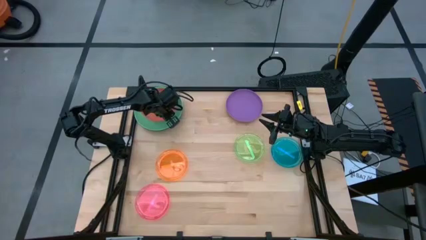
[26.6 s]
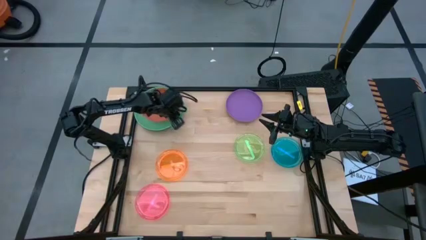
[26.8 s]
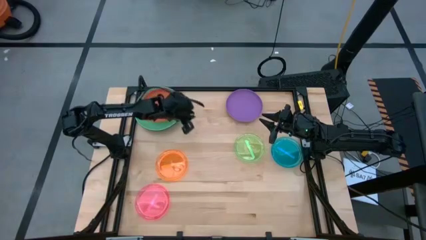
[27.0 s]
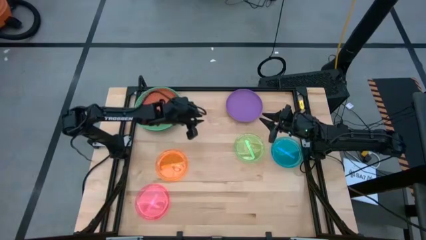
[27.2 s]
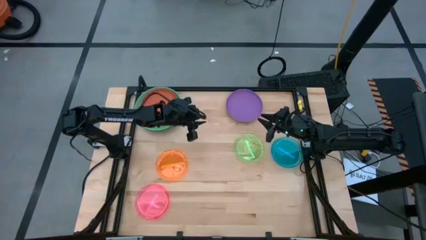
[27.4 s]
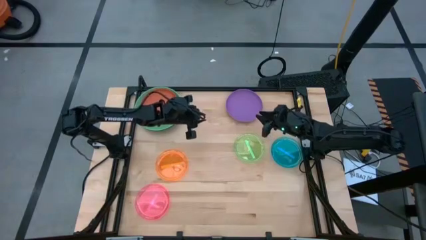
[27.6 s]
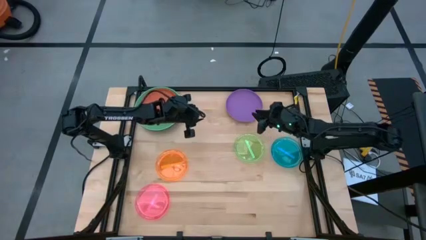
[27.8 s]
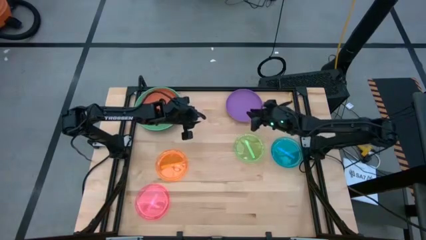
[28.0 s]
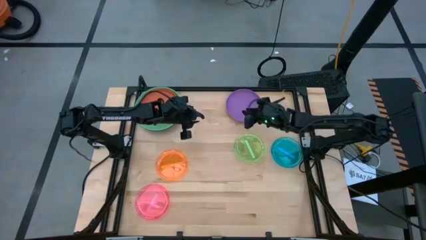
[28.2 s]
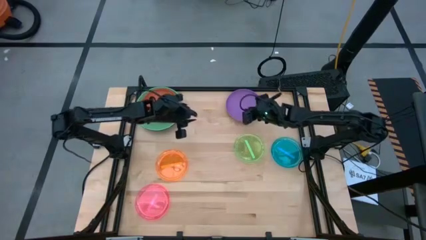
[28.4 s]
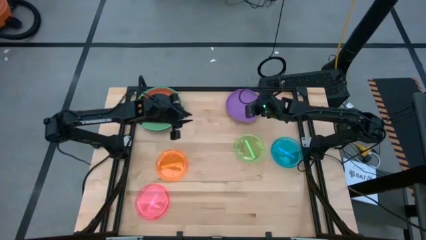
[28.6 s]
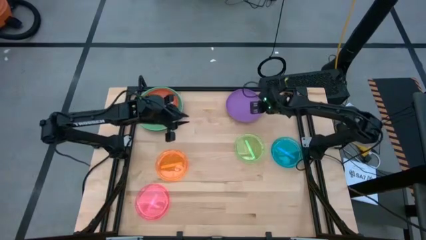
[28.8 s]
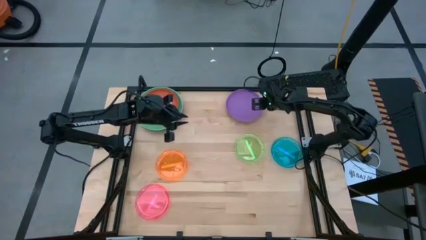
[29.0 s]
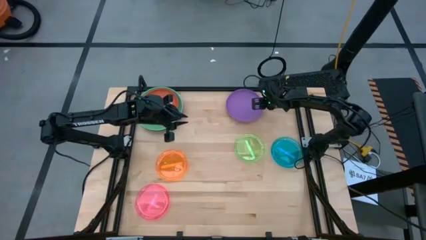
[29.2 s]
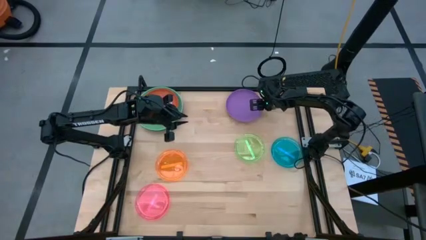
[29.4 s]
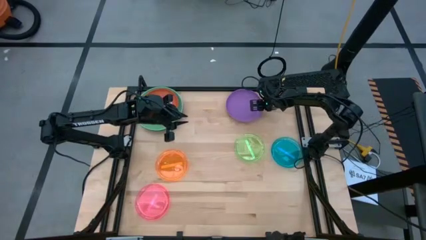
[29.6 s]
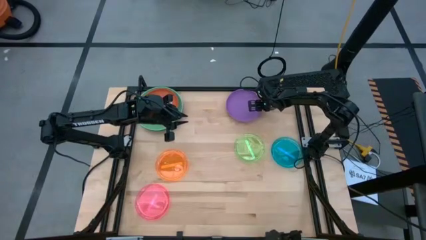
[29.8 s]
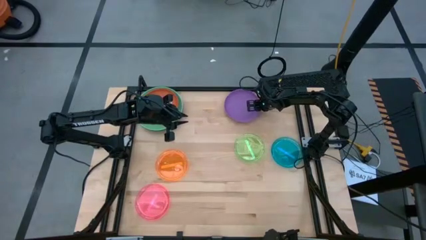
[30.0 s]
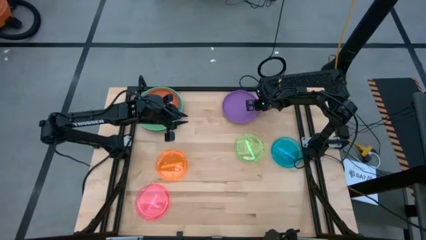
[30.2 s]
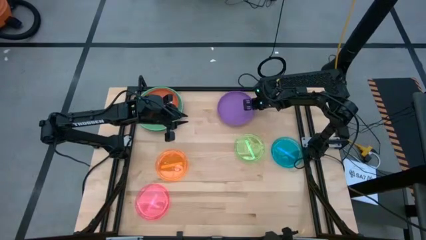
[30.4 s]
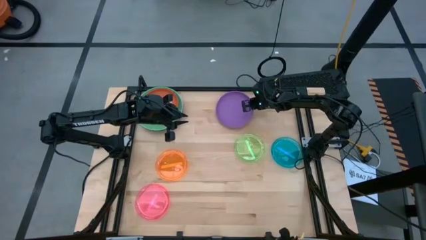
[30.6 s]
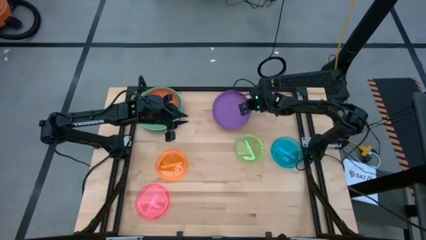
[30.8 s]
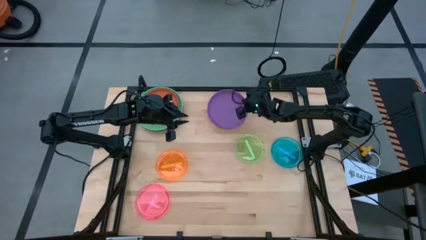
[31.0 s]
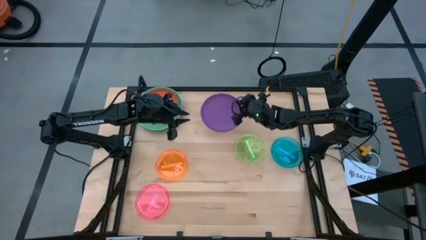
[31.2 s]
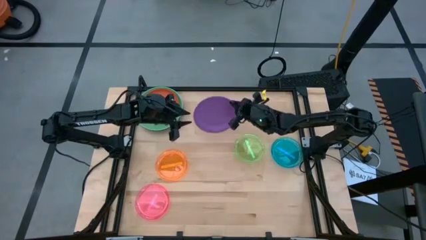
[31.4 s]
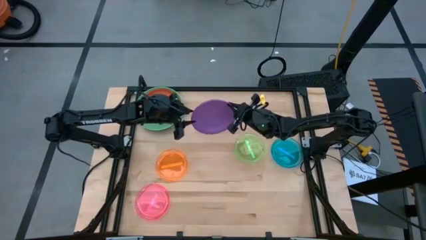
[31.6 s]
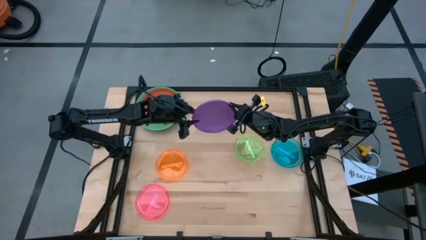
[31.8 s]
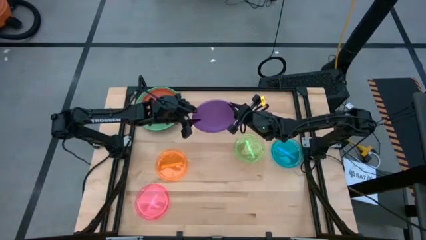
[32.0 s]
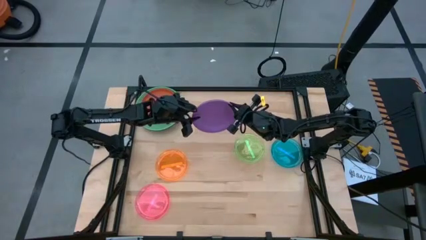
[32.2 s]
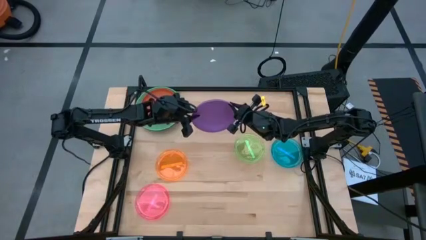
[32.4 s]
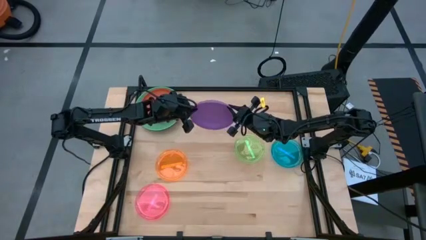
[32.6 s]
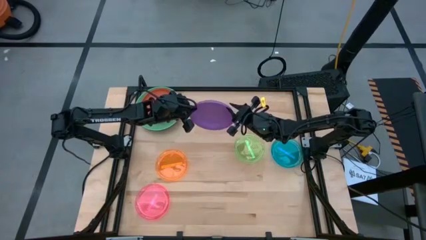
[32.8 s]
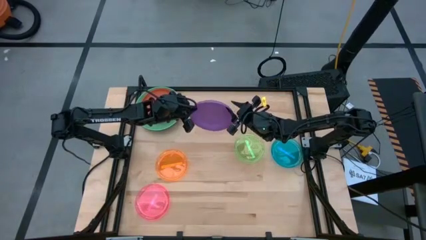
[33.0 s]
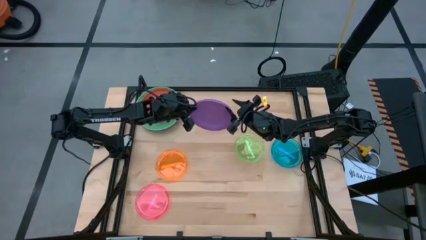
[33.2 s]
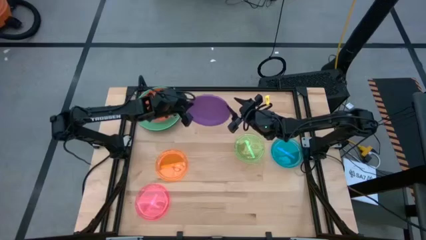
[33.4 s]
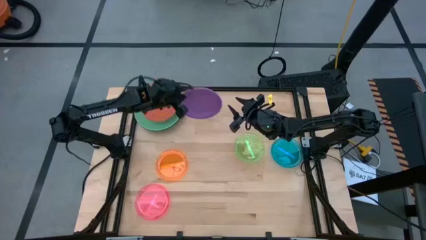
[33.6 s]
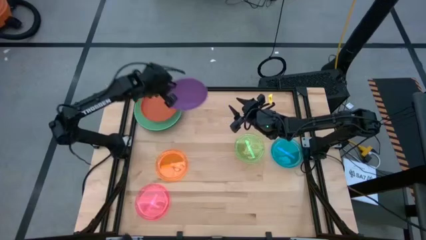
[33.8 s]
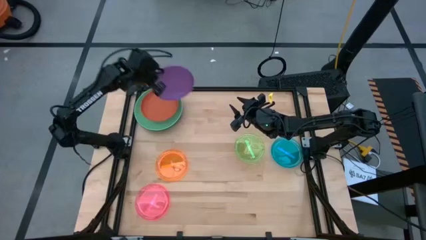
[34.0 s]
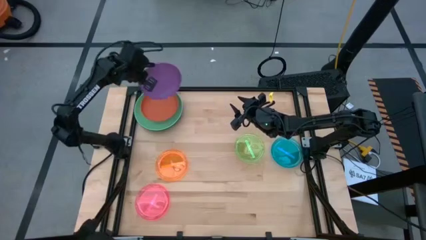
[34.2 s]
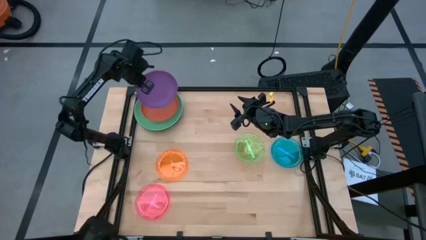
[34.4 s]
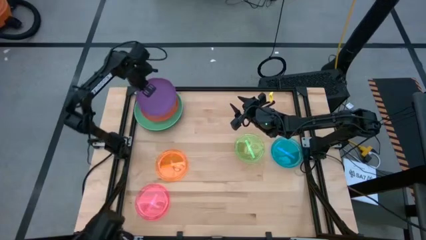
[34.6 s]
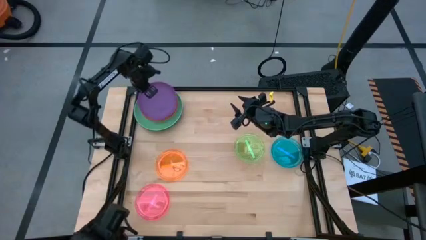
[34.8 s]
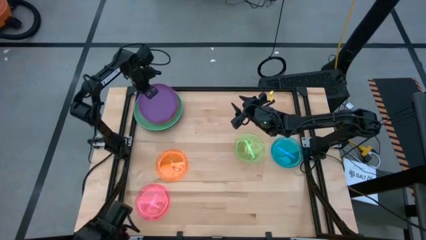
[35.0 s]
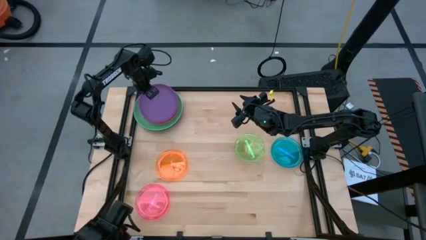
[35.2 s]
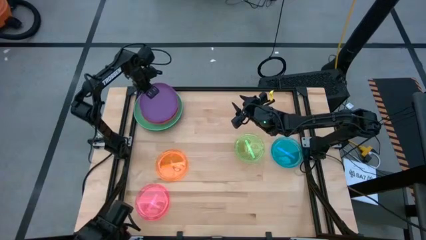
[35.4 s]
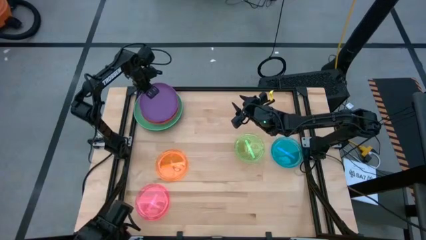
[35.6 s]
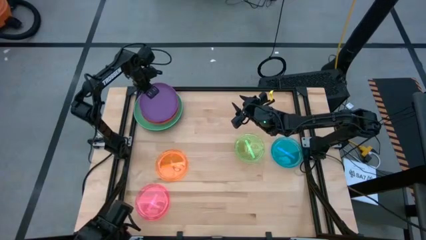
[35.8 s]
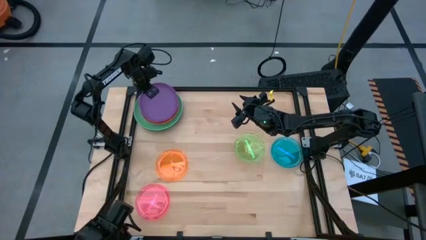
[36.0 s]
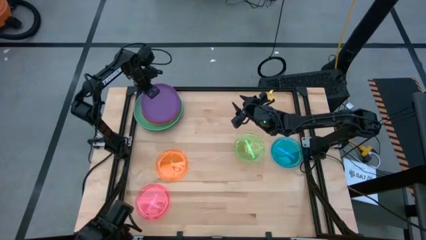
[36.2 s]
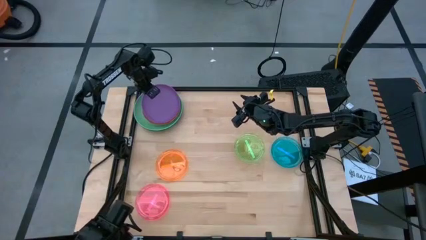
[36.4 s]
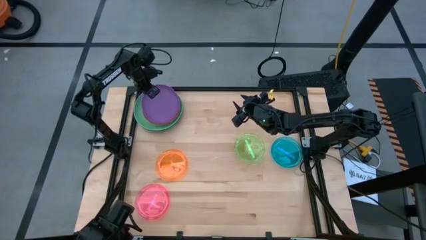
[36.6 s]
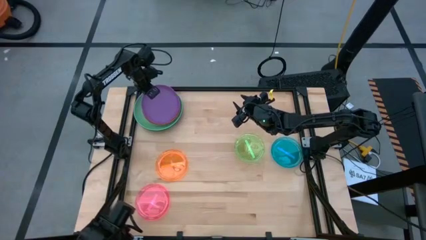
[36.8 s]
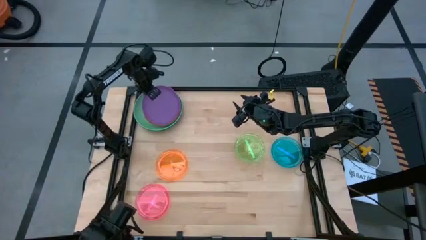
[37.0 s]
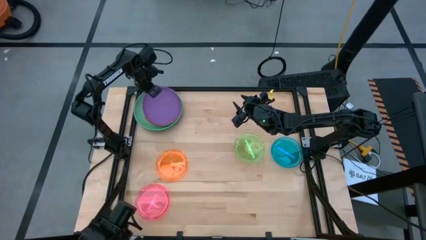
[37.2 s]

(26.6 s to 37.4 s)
Task: Stack plastic plates
Stack the violet plate on top of the orange plate
